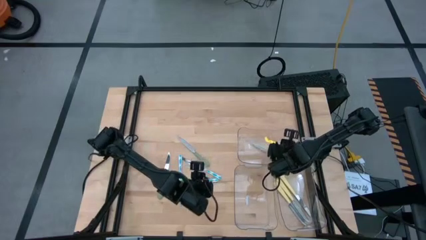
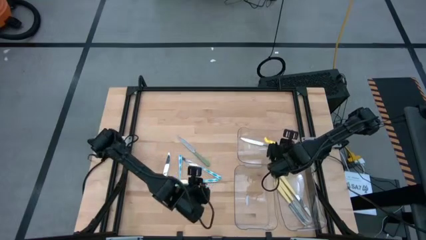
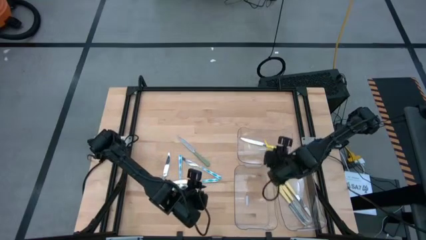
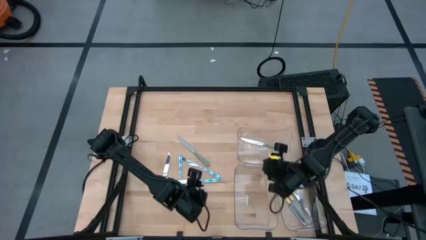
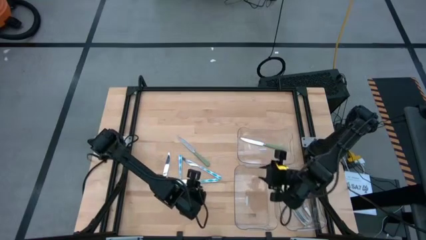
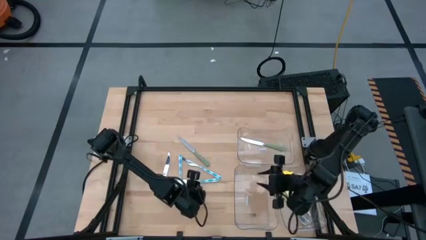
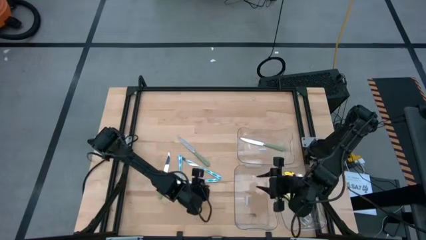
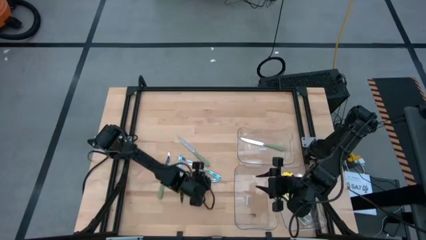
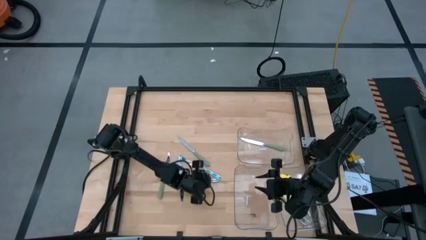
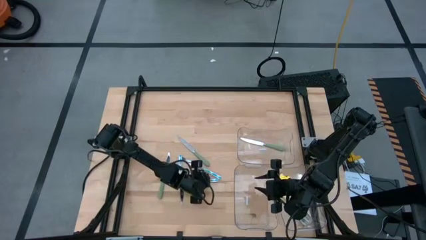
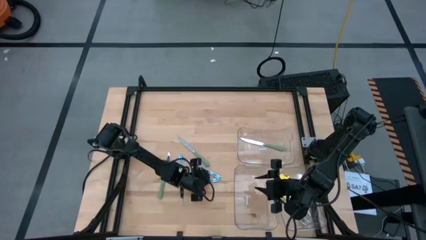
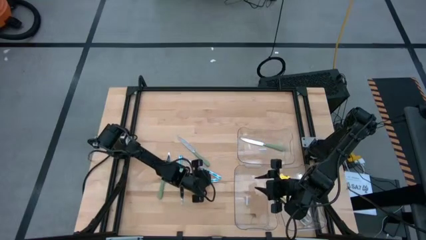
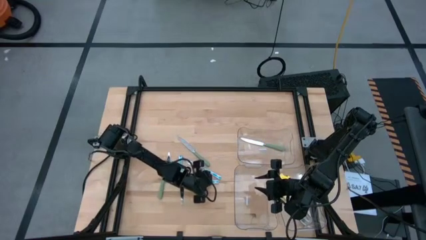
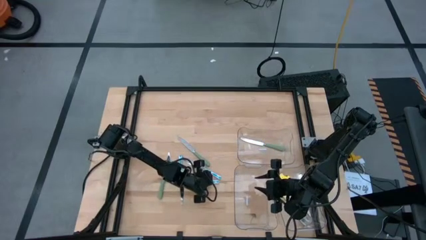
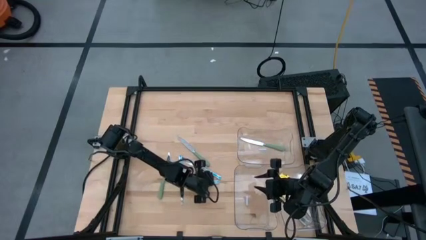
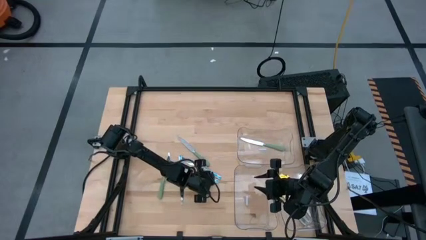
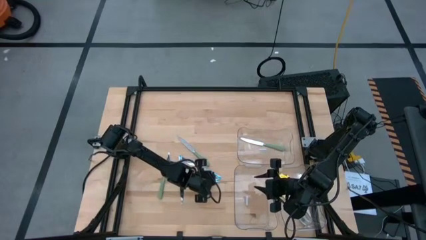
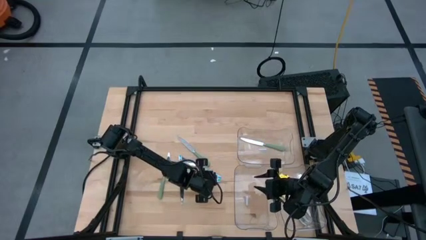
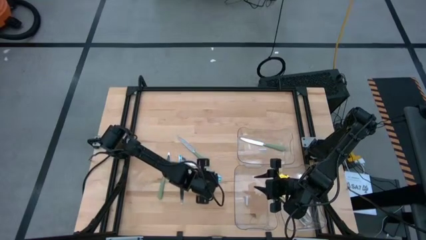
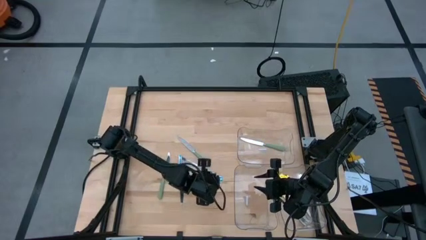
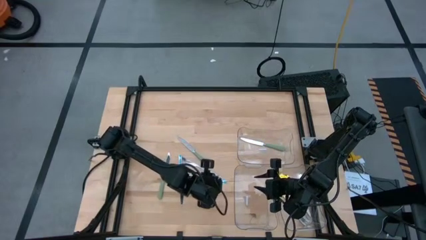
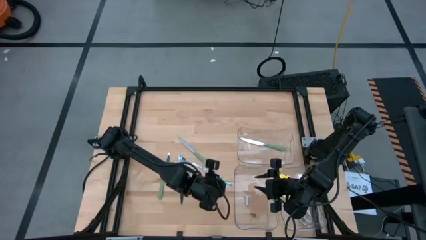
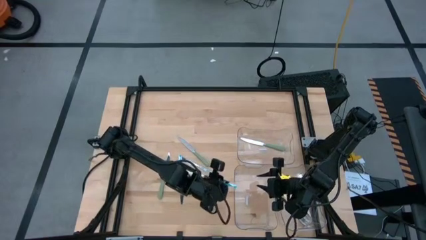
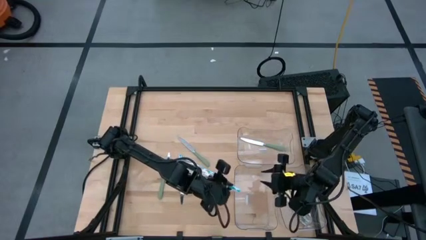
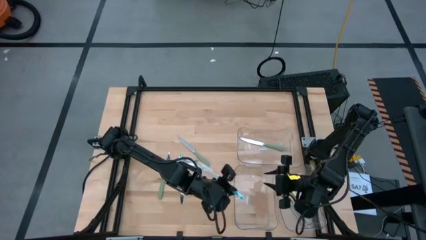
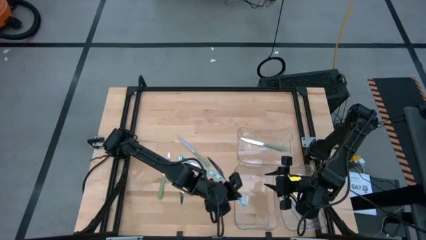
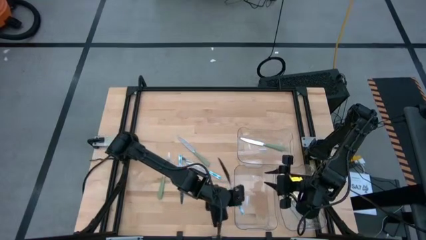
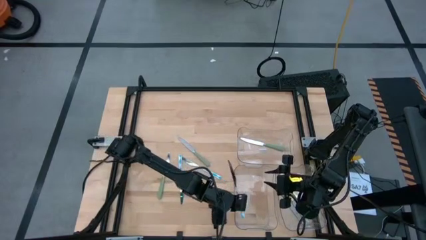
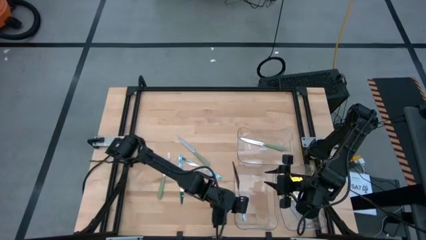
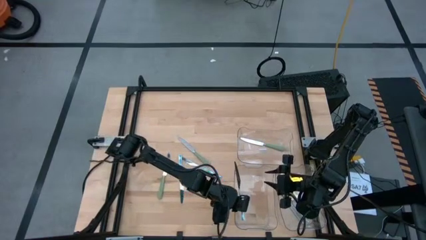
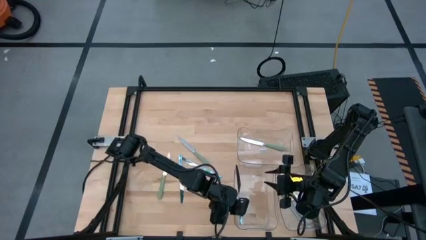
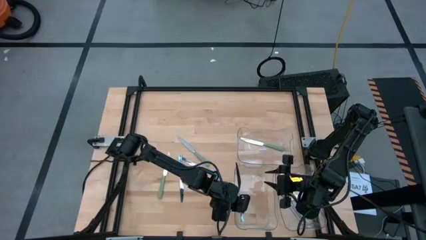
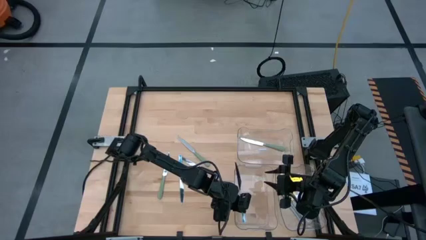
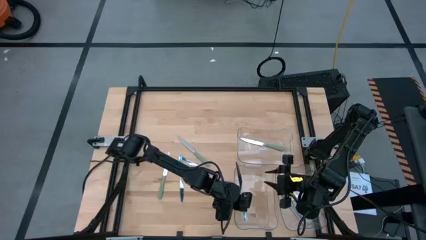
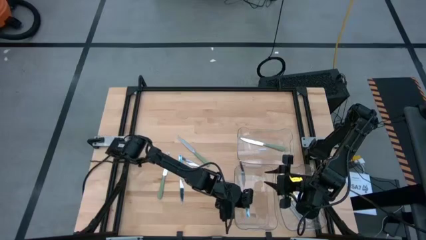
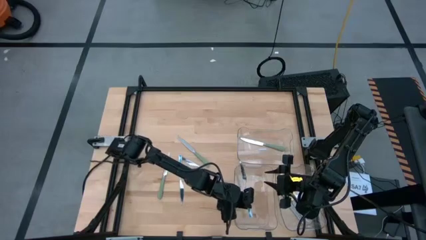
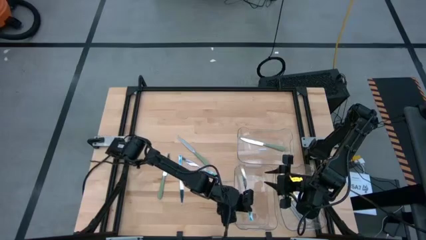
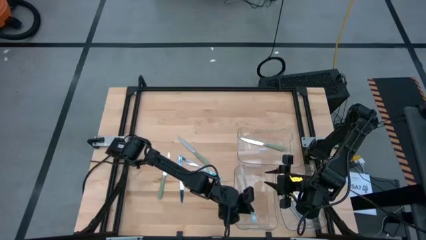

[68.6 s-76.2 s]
Task: Sort silverware by color (type)
Put the blue knife into the bottom left transparent bin

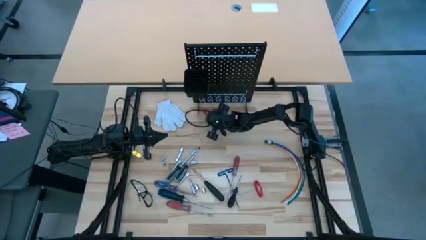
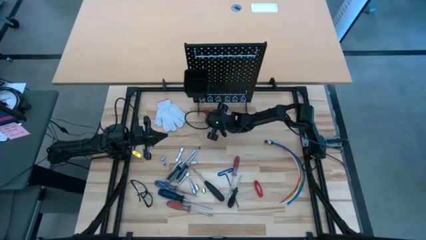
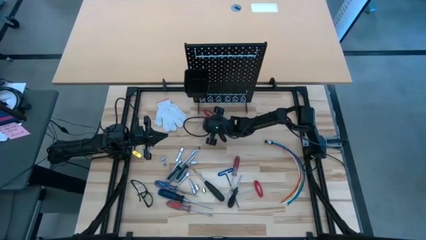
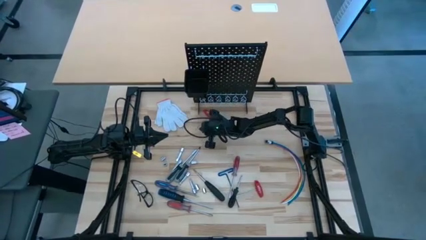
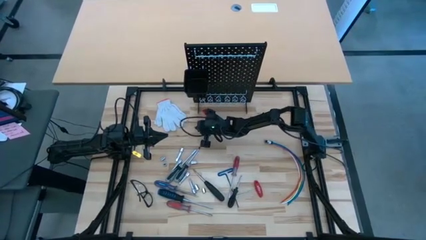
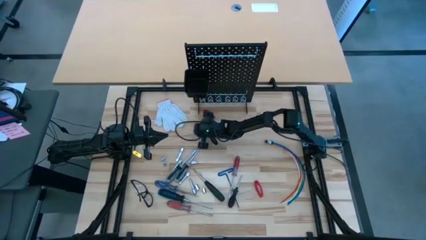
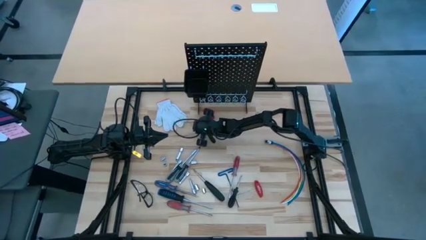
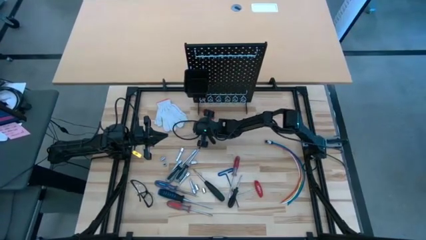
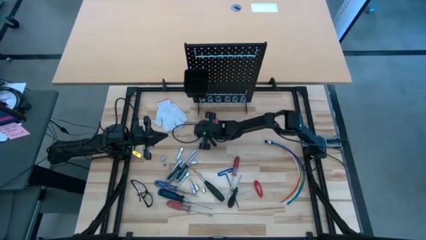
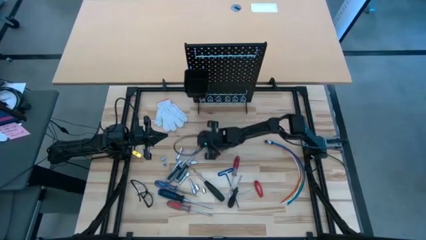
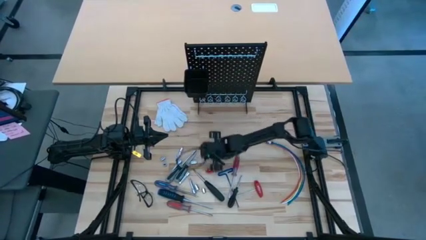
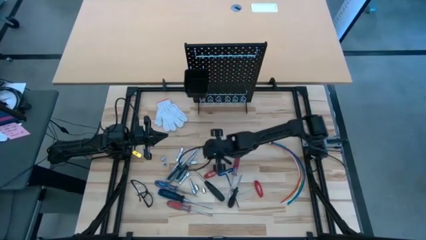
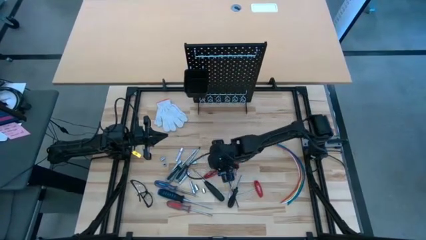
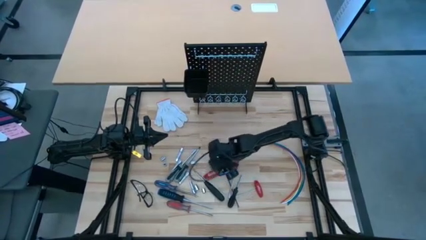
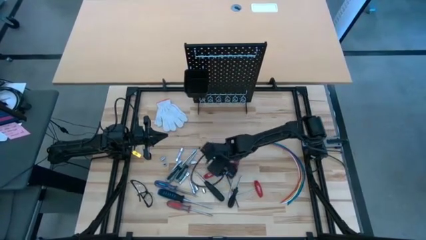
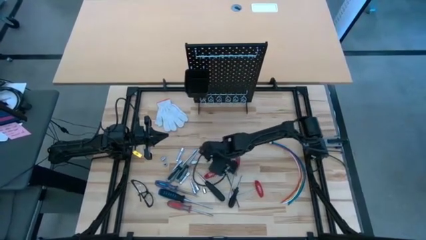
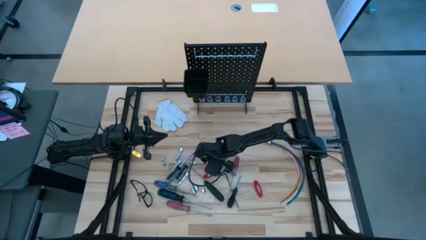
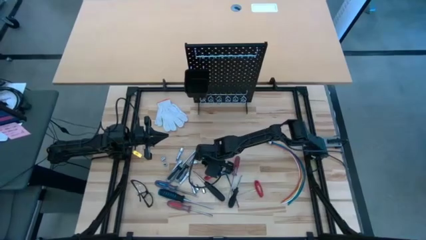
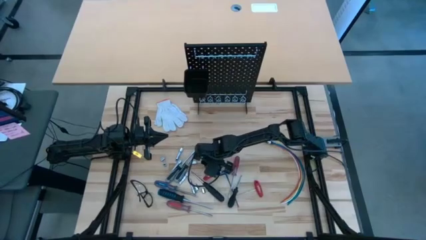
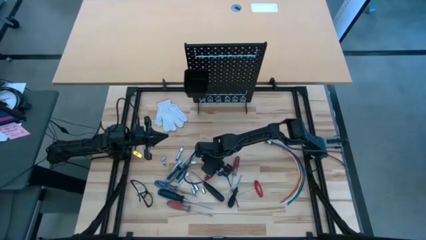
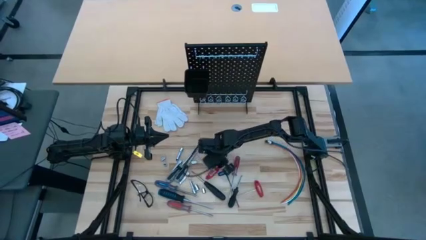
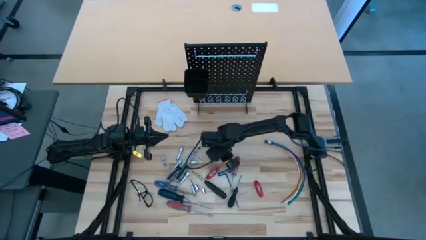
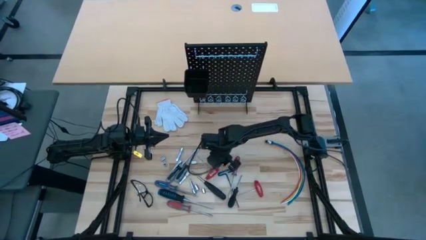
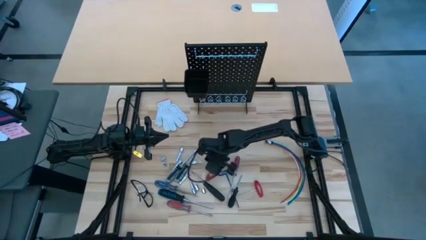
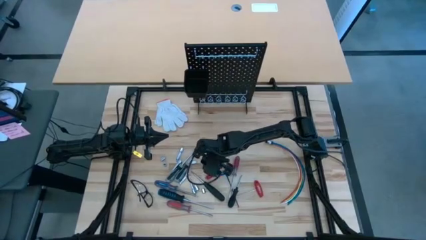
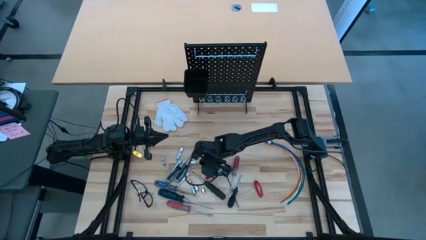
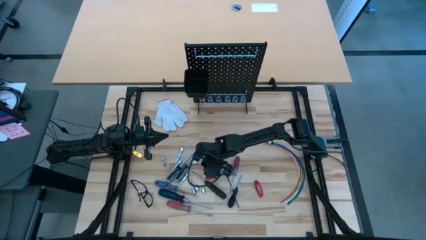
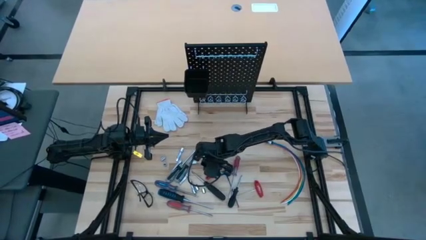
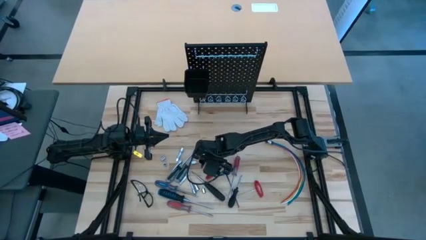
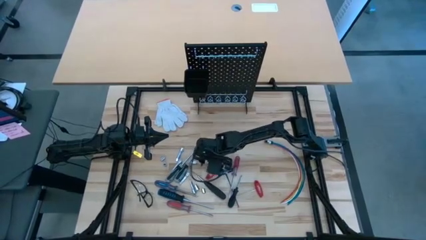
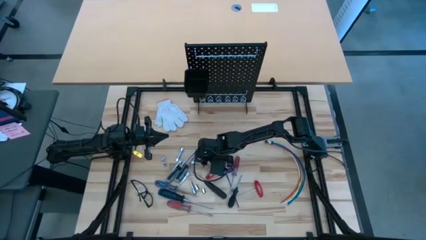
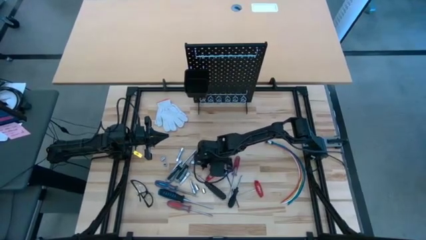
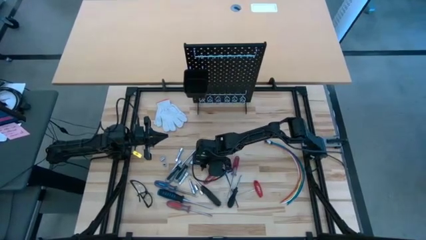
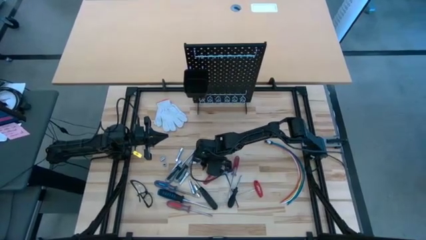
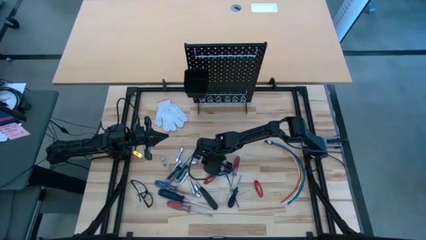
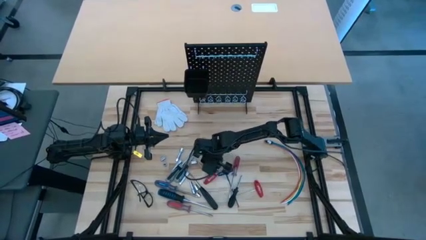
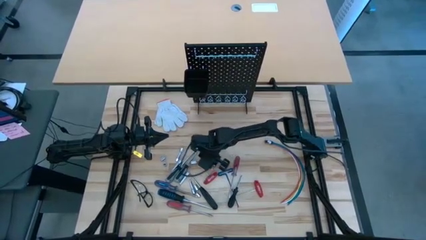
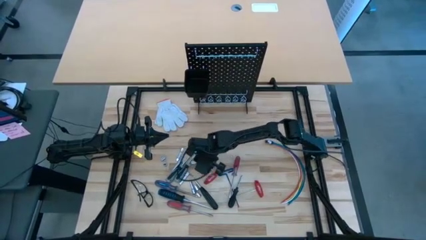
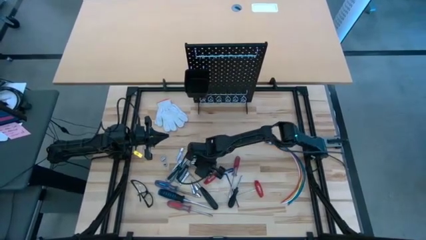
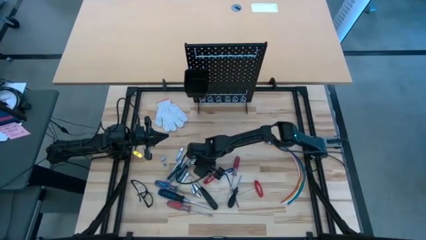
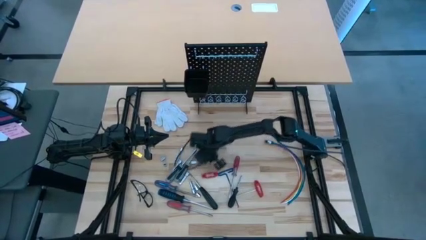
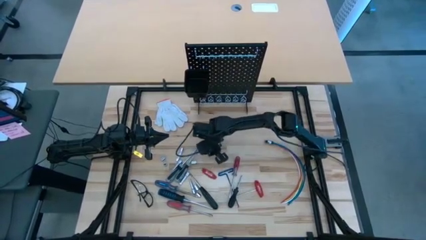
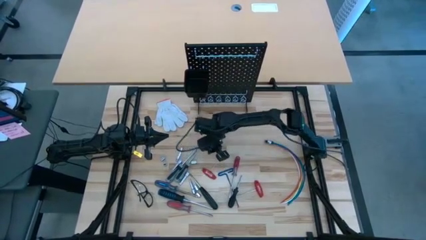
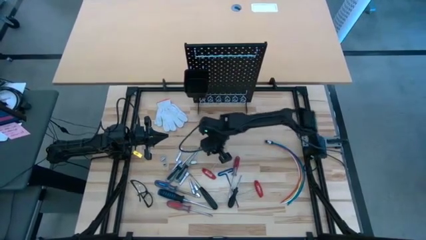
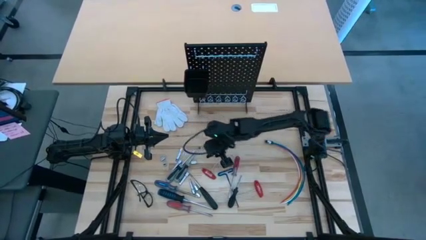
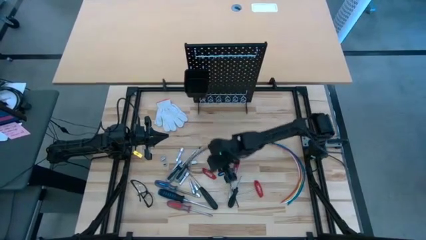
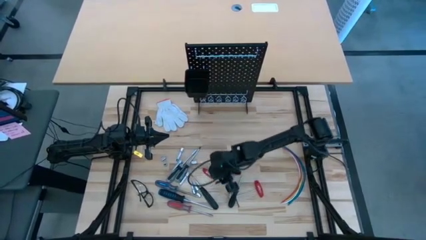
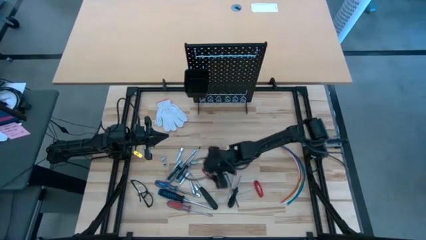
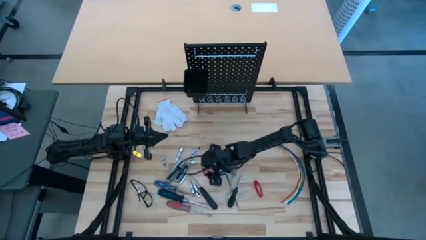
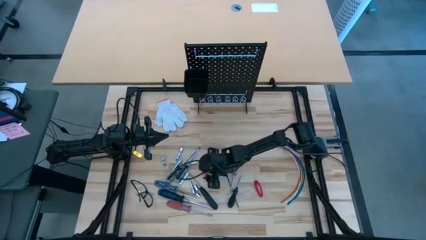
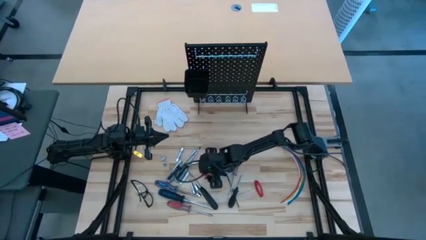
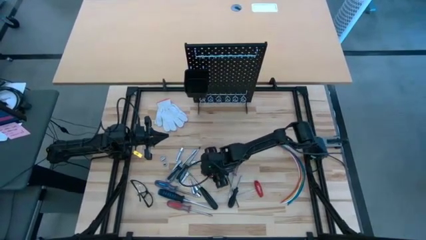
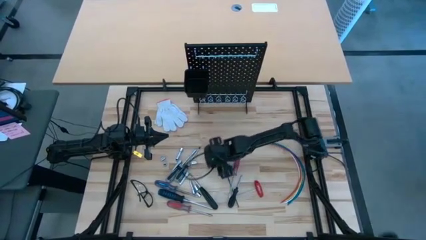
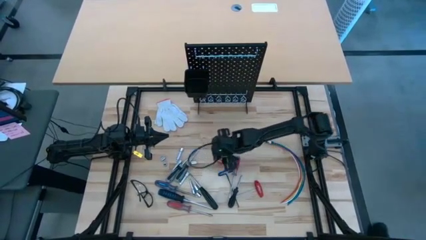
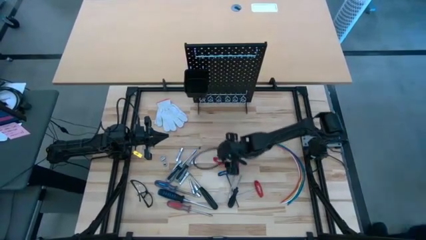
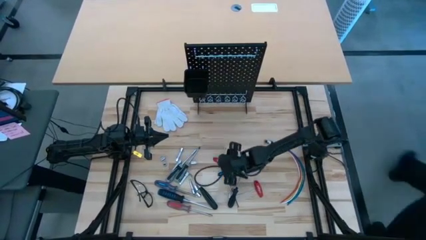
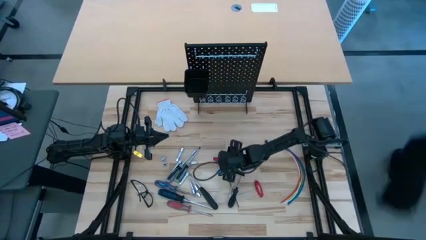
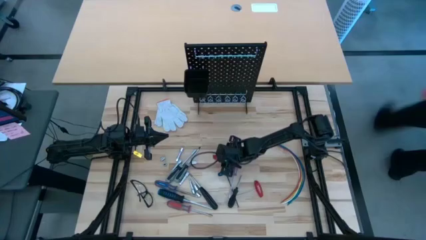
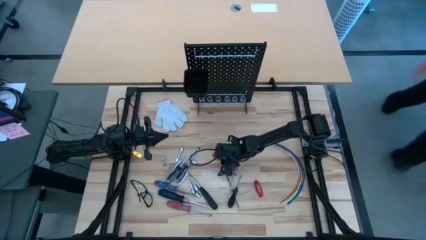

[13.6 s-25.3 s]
Task: Hang tools onto peg board
Hang the red allen wrench on the pegboard
